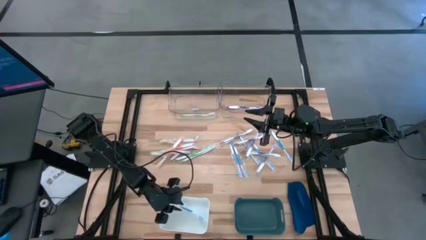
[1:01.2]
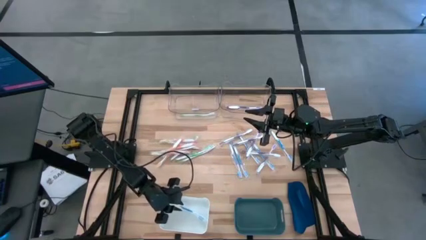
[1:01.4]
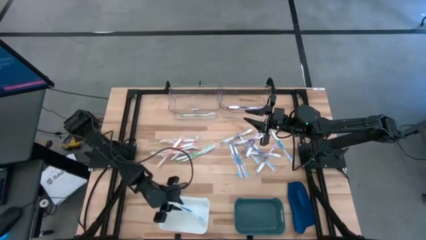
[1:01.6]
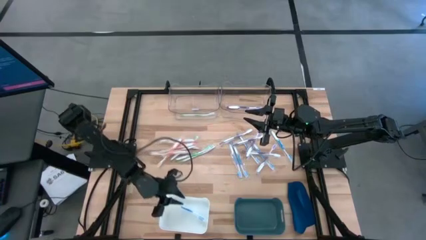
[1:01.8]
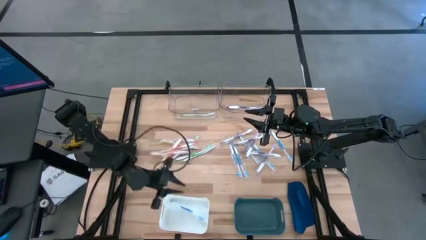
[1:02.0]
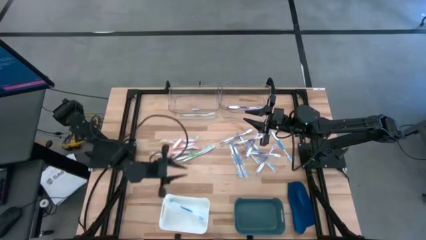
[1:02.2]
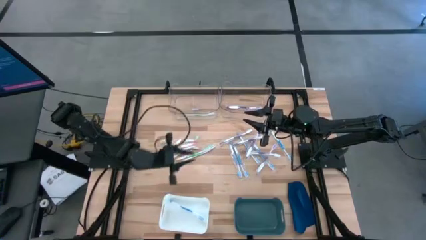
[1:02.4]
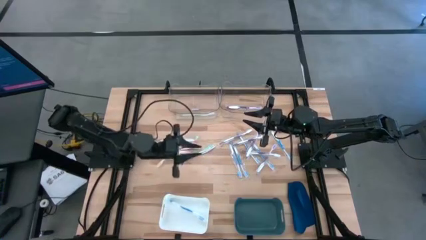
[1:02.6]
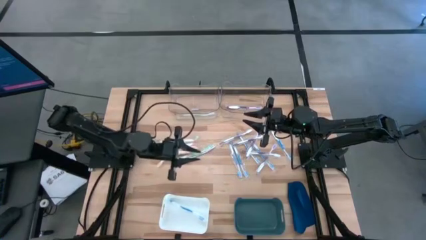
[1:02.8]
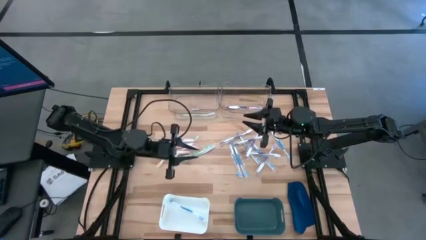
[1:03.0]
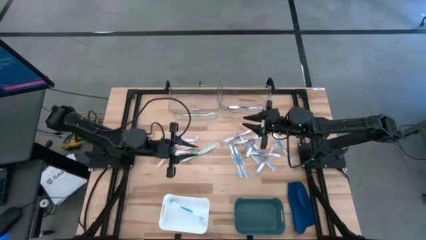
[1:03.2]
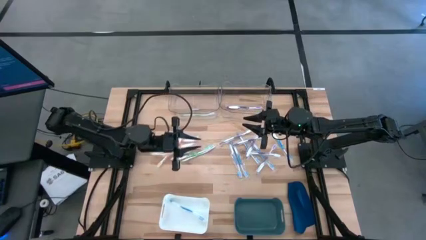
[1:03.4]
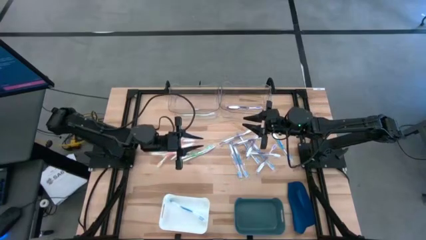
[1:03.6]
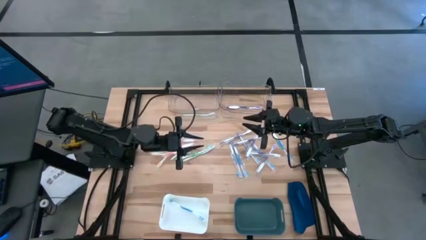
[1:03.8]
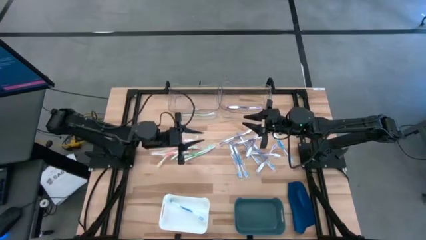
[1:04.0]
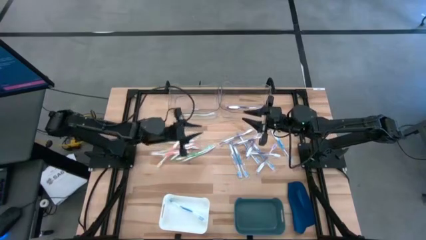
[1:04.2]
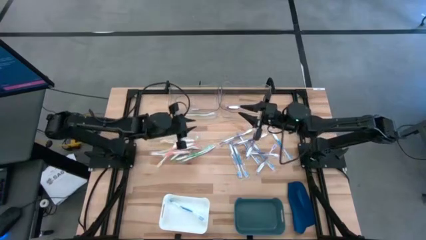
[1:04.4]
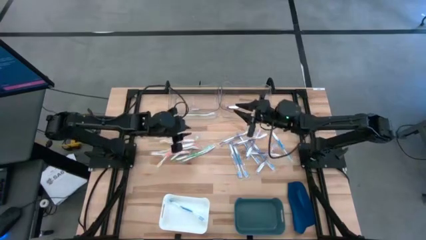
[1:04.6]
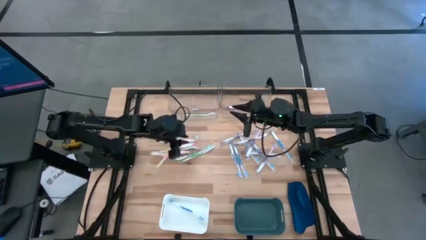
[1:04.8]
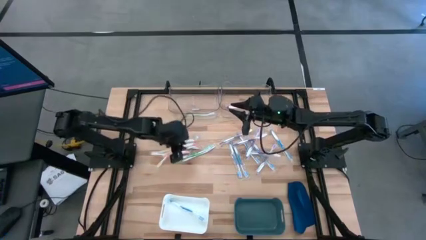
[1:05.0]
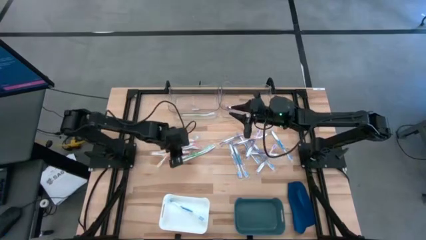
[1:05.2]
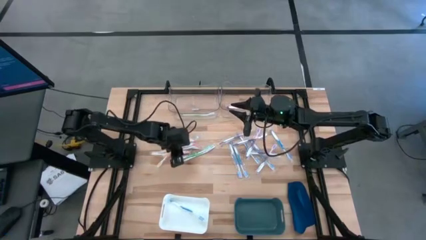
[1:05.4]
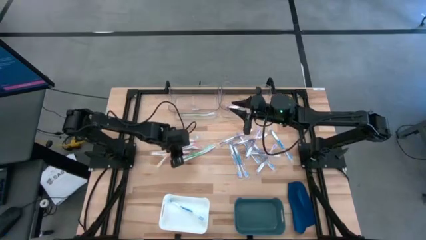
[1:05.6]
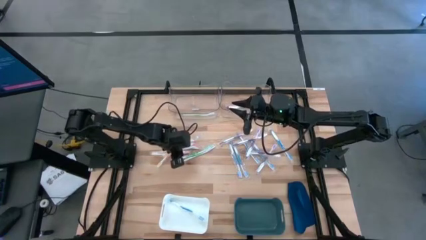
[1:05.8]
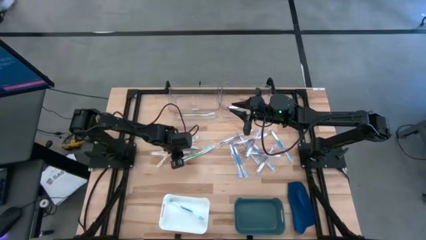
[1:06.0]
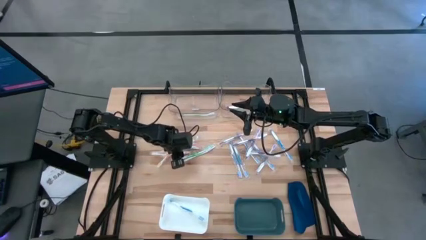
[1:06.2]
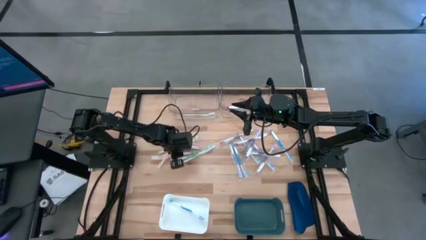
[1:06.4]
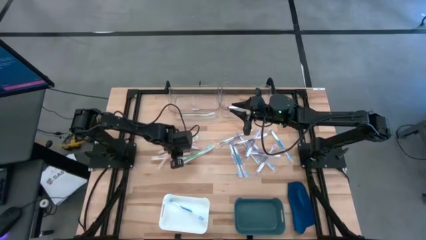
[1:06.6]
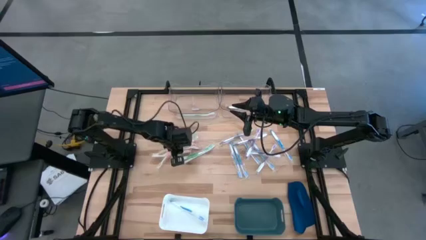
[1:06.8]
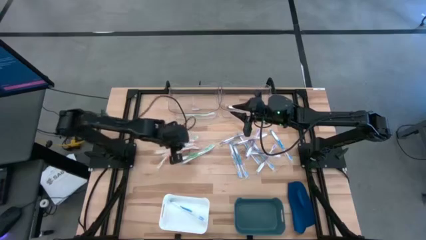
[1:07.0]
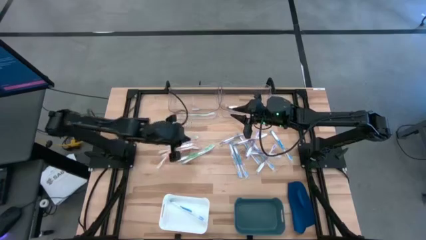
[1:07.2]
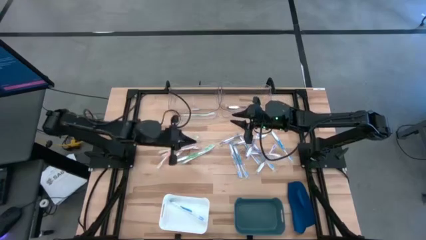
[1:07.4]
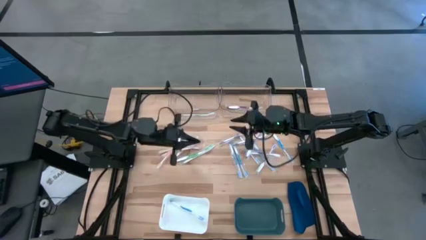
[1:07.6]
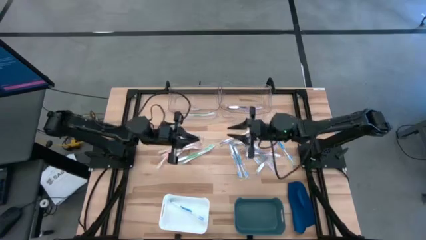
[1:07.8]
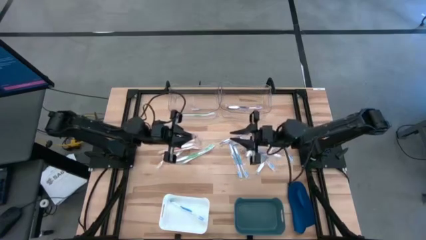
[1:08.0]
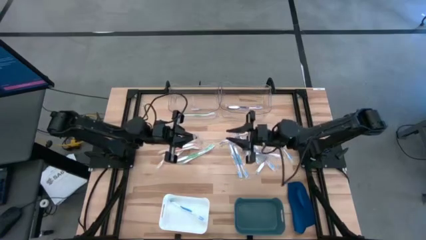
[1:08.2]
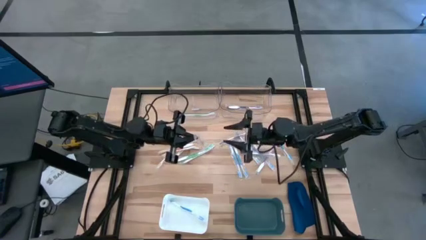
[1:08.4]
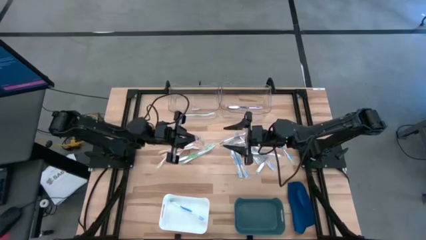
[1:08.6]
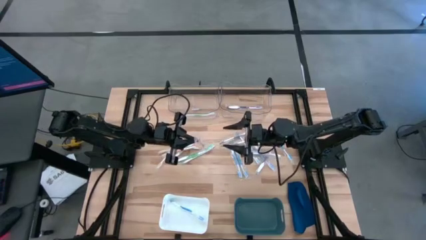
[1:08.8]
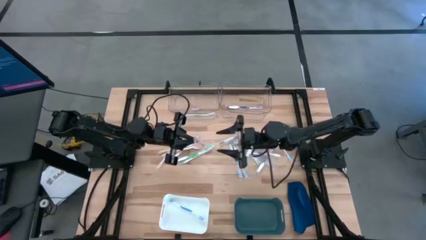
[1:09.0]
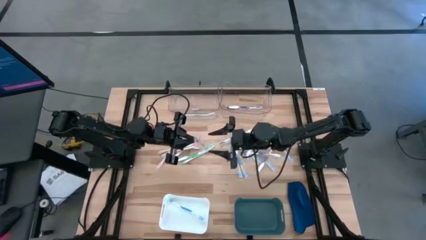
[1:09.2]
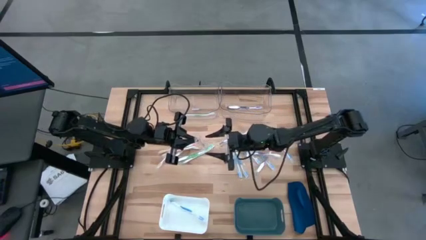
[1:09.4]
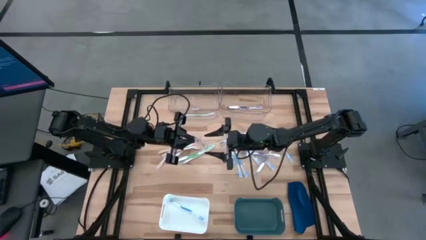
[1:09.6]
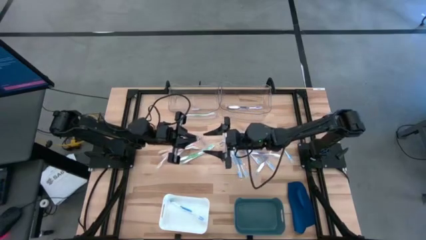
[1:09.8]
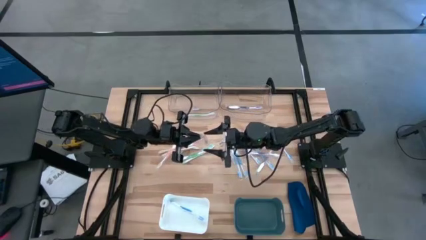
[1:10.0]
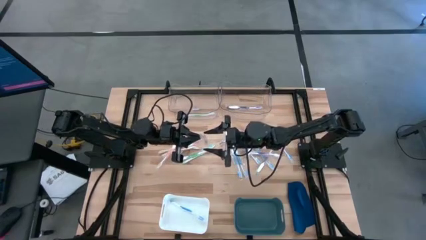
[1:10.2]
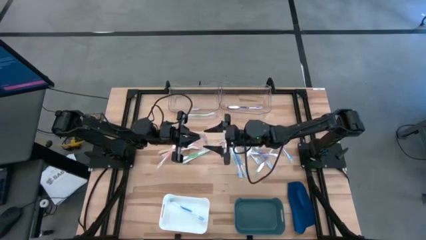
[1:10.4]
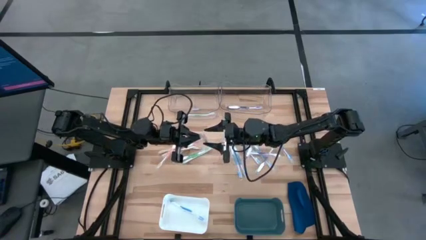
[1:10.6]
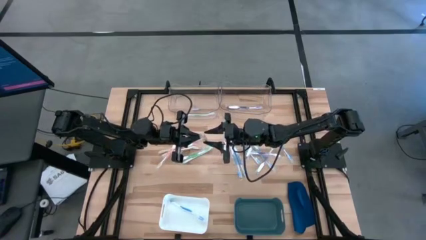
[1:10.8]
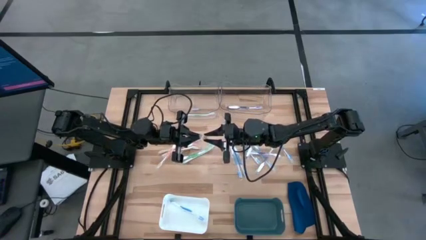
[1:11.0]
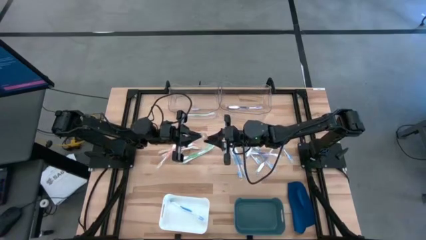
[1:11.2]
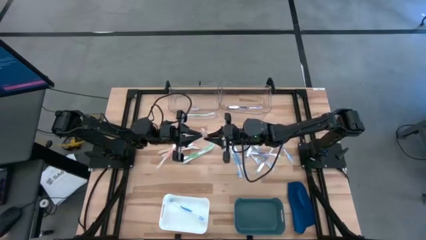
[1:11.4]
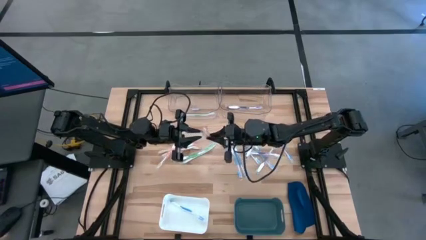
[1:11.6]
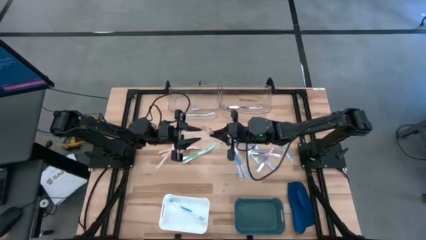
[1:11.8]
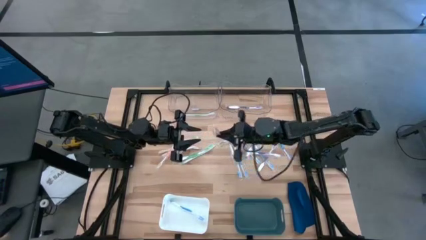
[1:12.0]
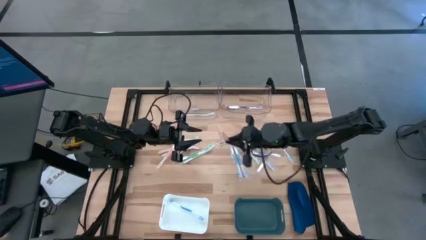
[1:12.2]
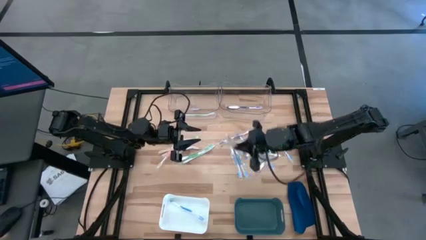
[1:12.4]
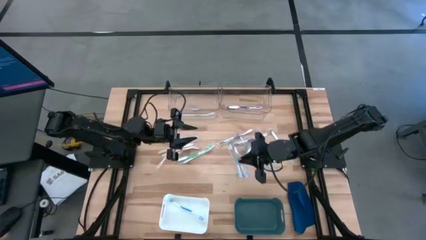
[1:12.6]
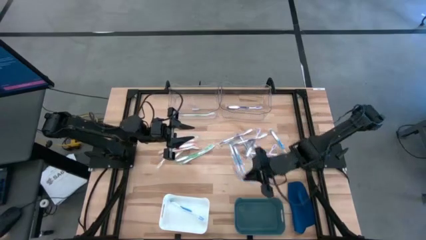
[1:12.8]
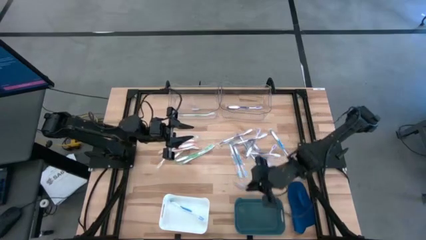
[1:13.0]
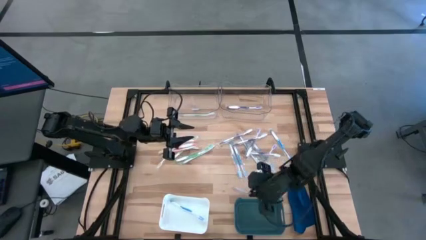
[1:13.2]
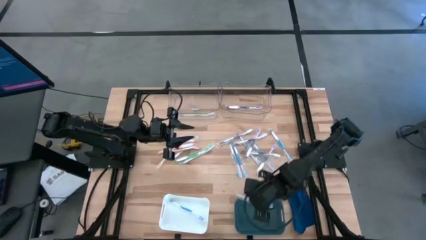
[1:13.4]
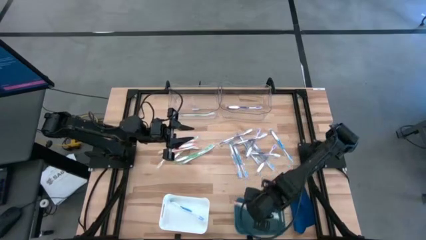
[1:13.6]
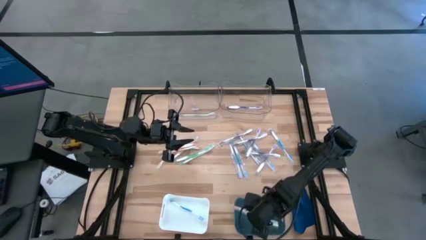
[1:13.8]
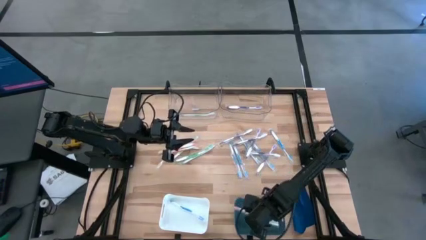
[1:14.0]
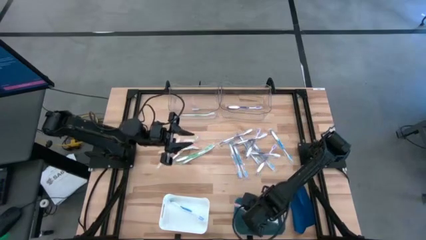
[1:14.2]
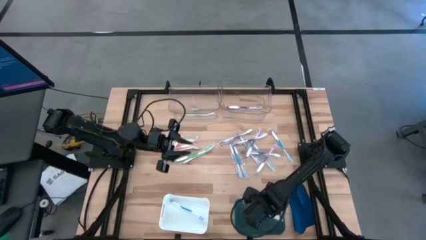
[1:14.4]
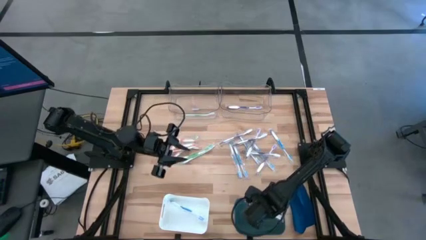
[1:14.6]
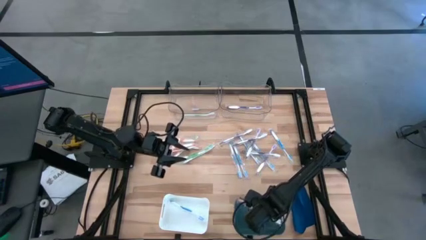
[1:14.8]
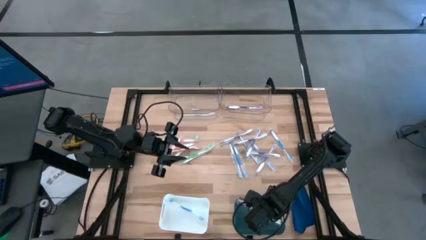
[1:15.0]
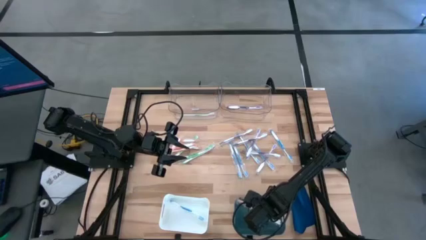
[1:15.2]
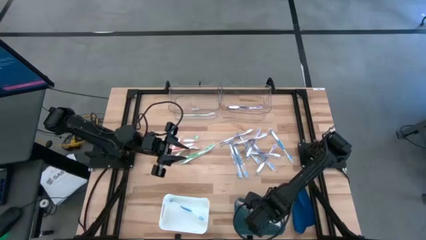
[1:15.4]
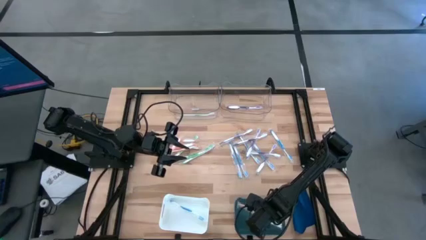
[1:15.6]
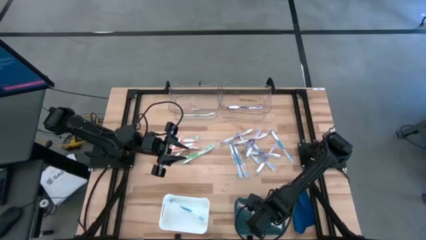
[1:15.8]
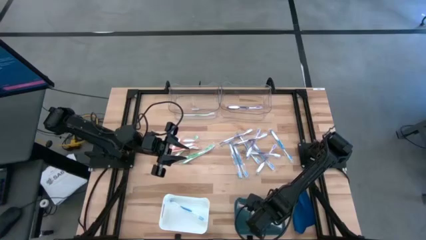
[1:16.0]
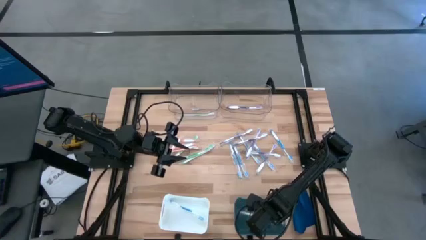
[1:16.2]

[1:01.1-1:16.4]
Task: Pick & Place Toothbrushes
Put the orange toothbrush into the green bin

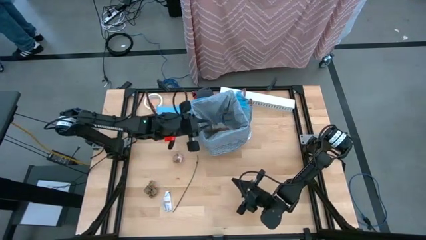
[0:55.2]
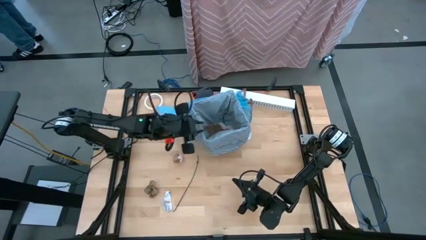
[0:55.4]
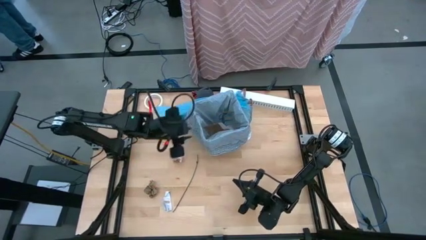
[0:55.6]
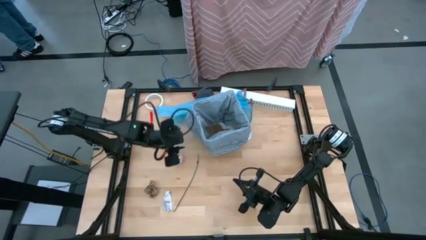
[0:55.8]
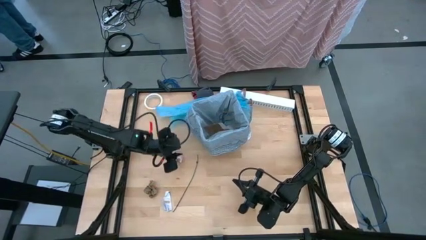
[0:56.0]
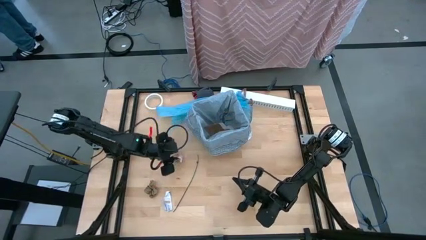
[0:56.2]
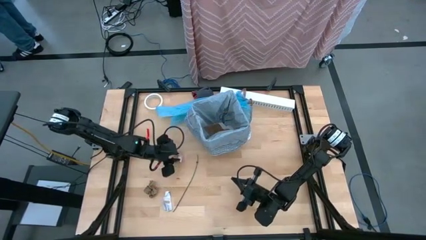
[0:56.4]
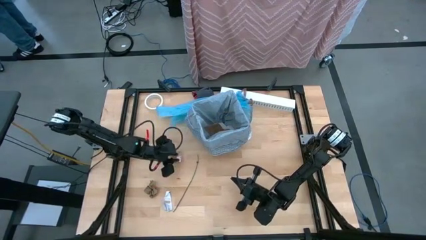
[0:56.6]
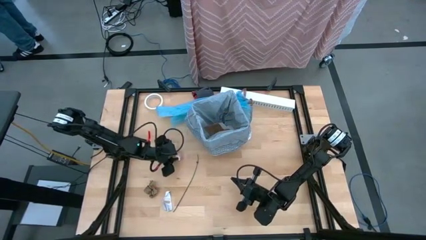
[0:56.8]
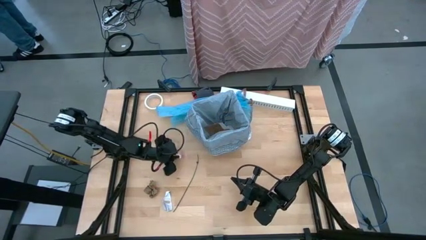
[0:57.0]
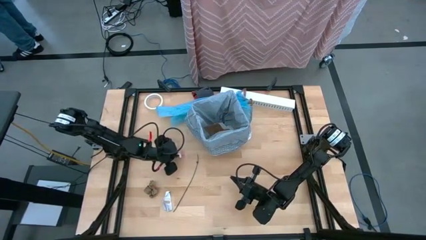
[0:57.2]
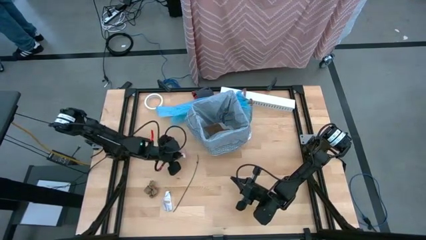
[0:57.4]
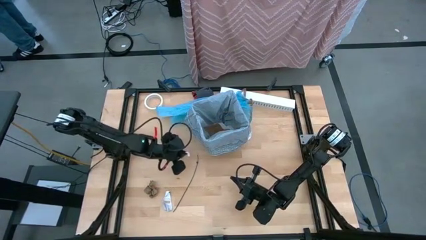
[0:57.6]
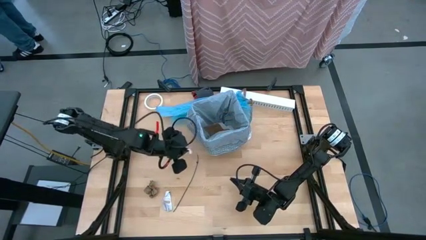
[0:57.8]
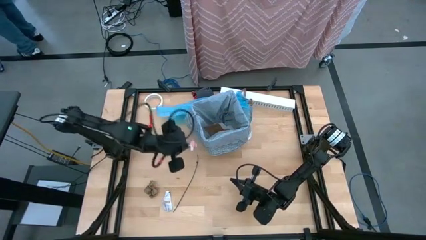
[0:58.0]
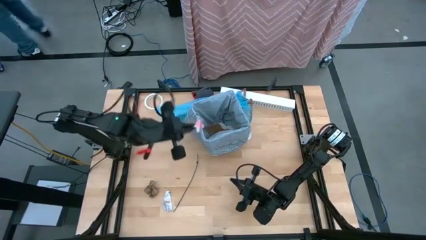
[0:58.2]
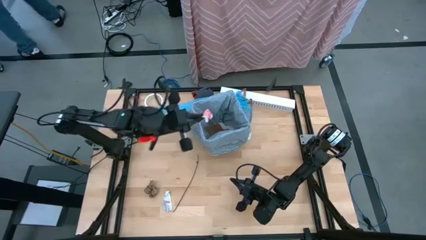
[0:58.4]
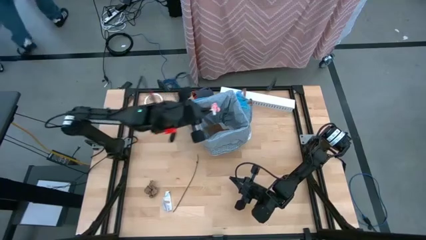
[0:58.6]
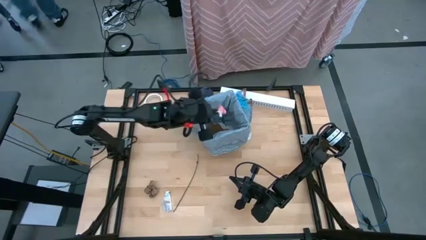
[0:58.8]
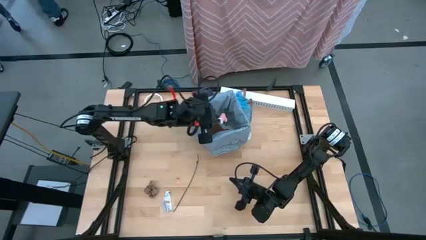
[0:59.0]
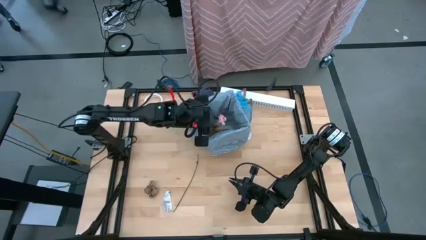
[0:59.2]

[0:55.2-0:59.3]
Task: place trash/remove bag and relplace
Put the brown napkin inside the black trash bin
